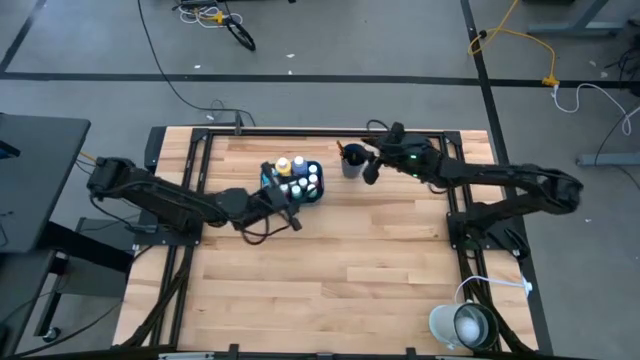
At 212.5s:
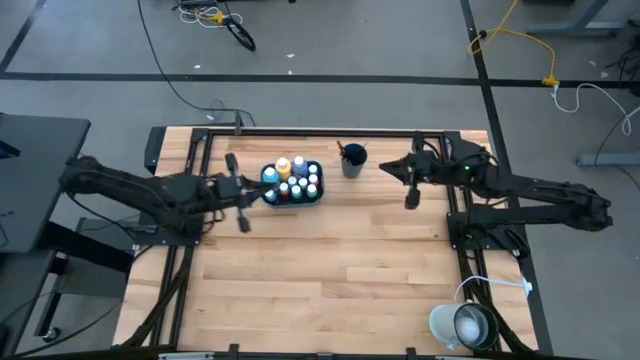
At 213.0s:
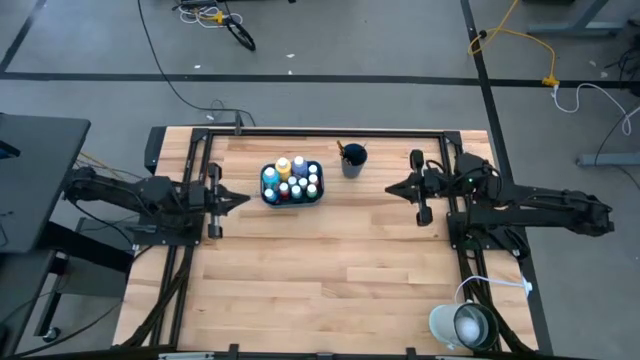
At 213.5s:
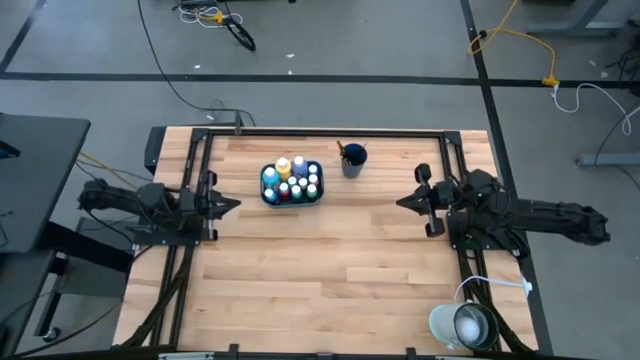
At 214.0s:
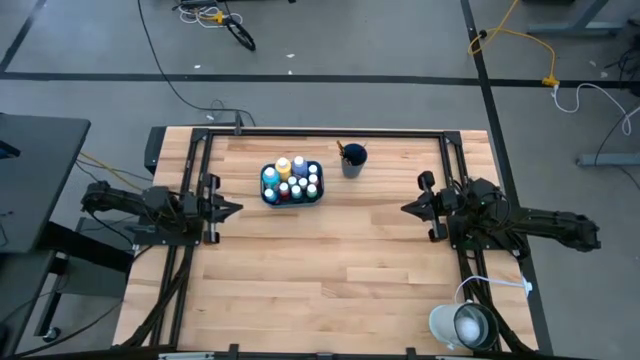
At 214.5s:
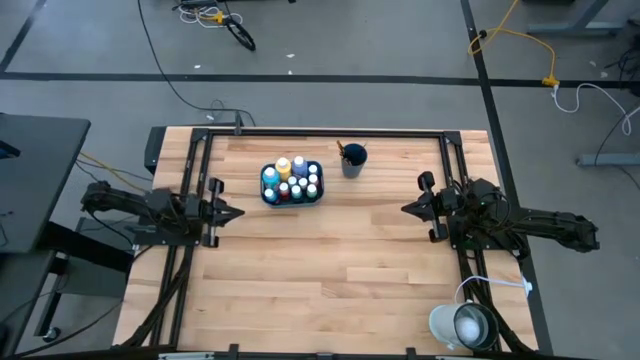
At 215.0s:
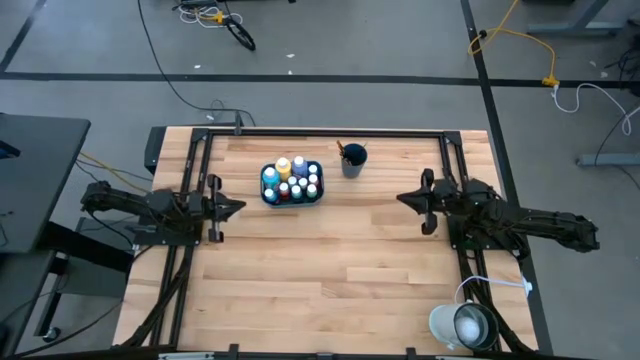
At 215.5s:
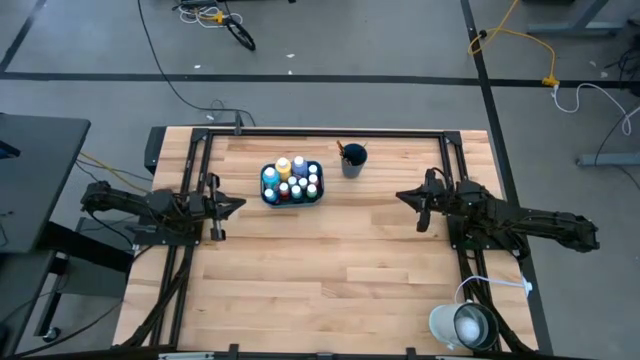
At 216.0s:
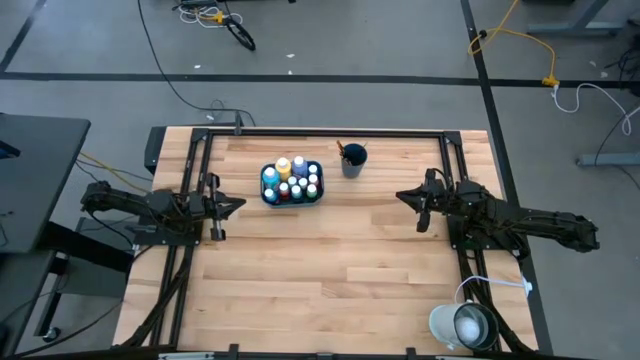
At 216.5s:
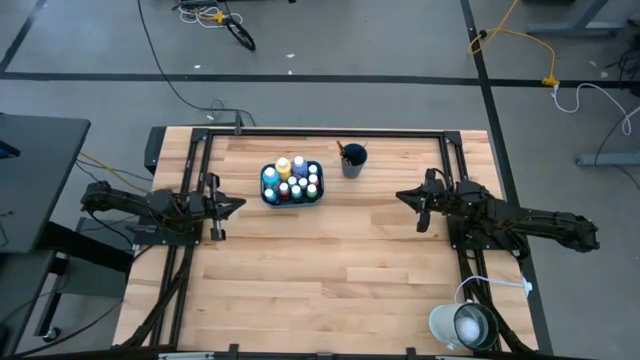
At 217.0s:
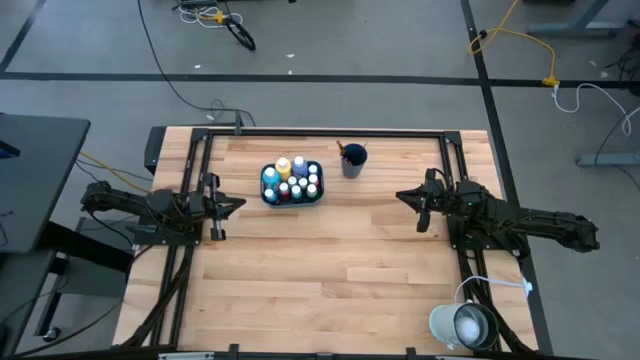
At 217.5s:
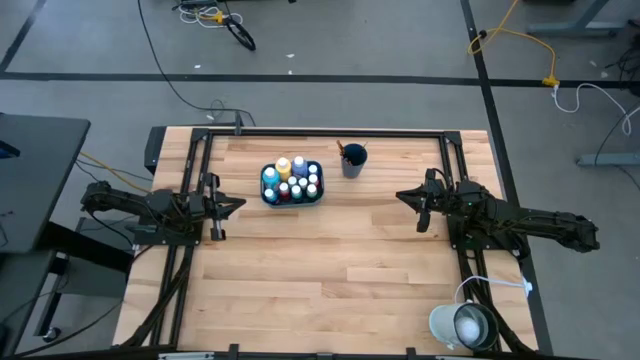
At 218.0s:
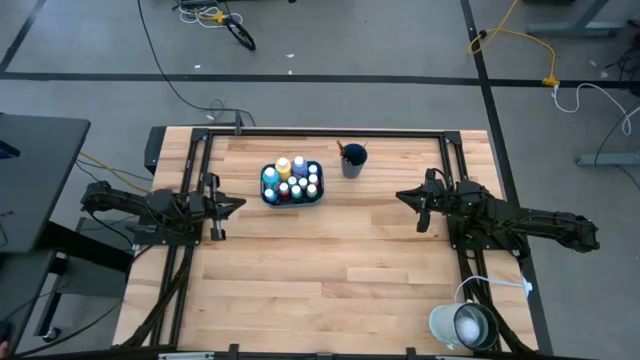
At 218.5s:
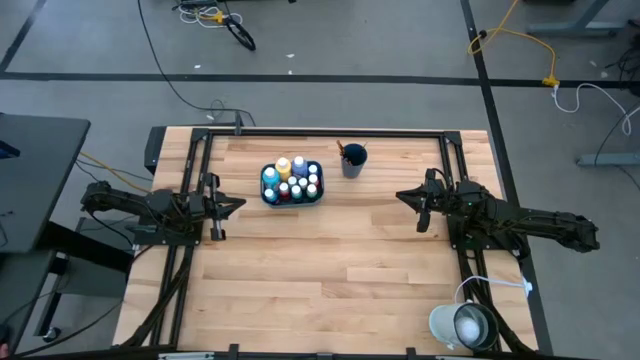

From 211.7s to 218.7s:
Task: Pick & Place Paint Supplies
Return to Home Position

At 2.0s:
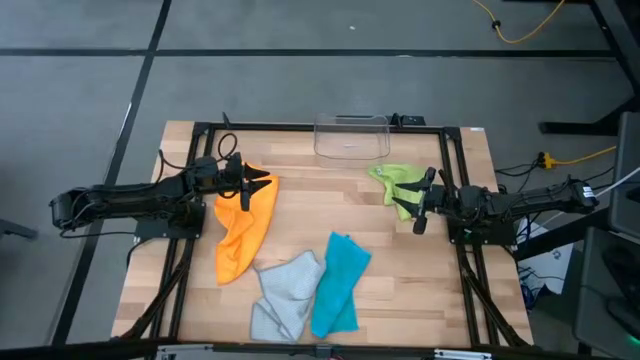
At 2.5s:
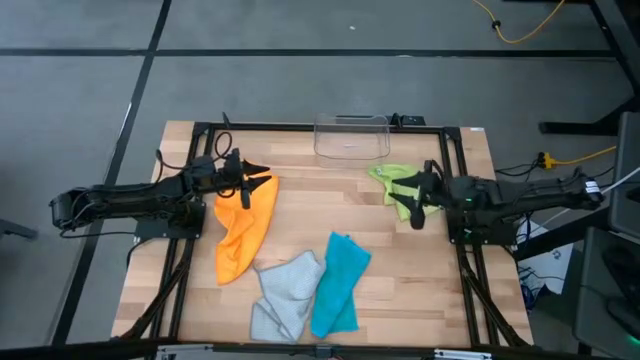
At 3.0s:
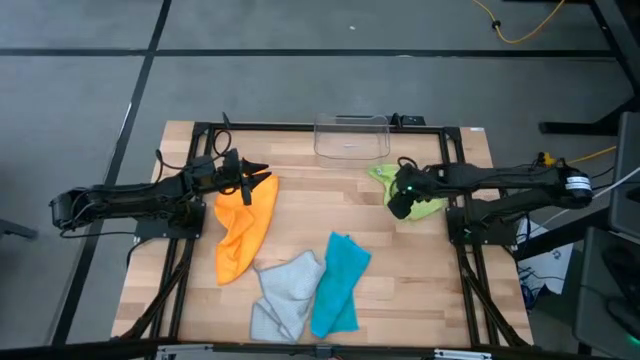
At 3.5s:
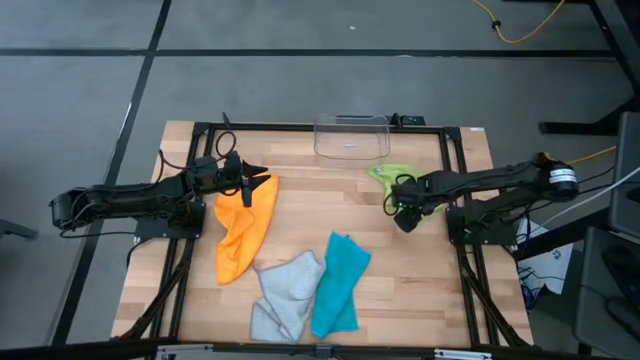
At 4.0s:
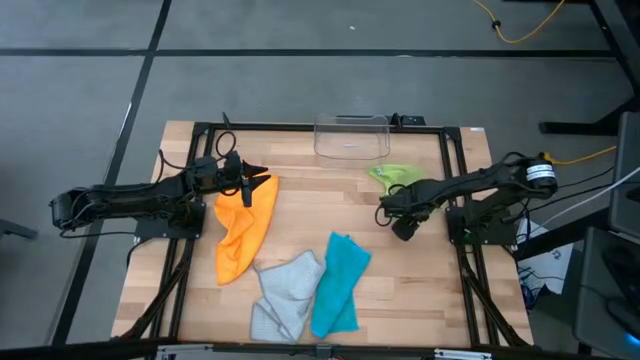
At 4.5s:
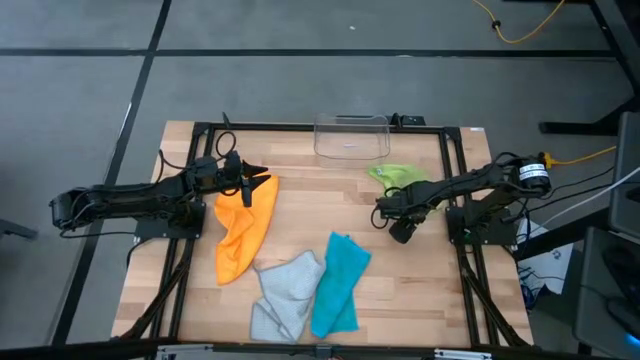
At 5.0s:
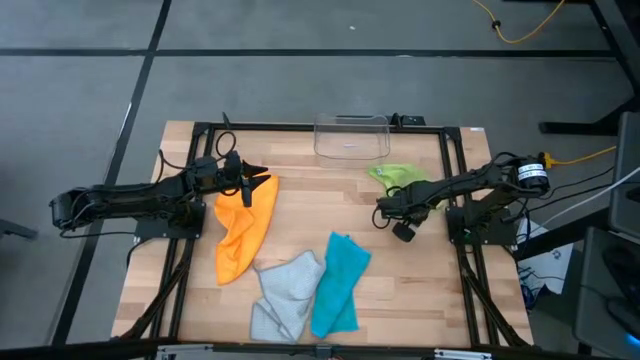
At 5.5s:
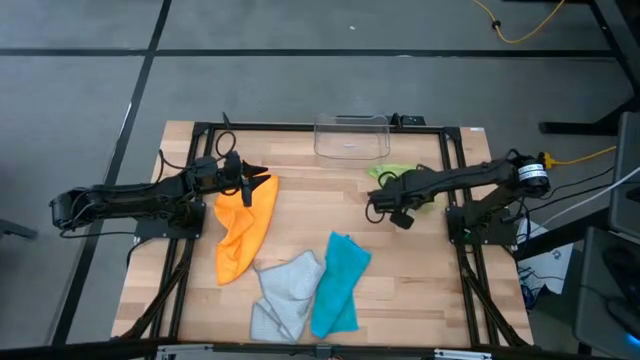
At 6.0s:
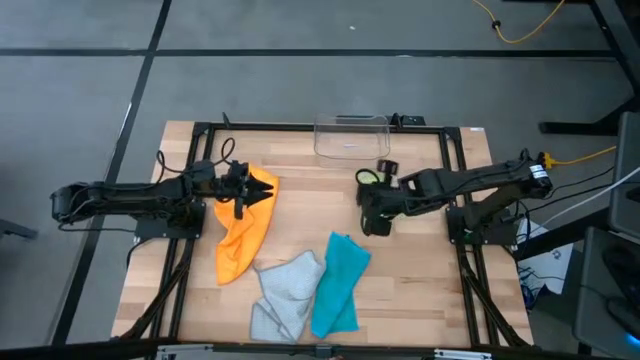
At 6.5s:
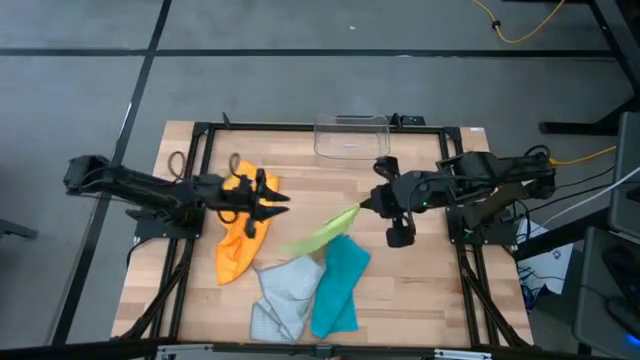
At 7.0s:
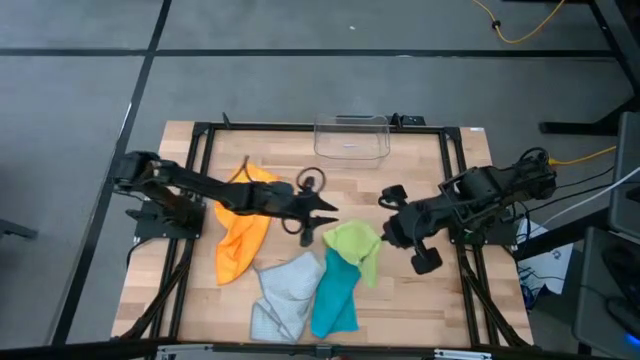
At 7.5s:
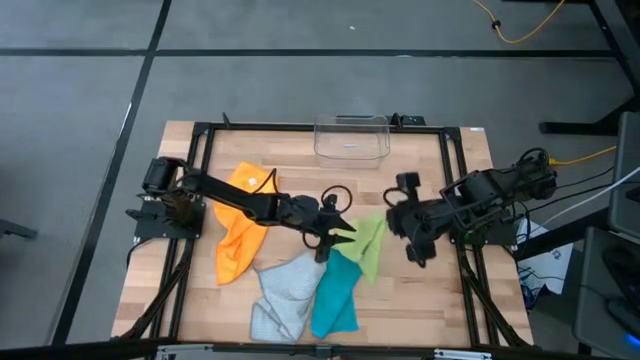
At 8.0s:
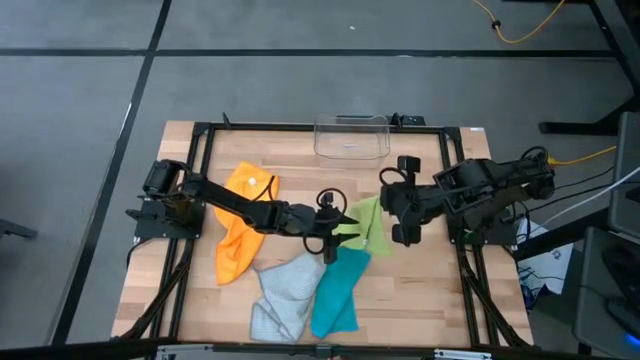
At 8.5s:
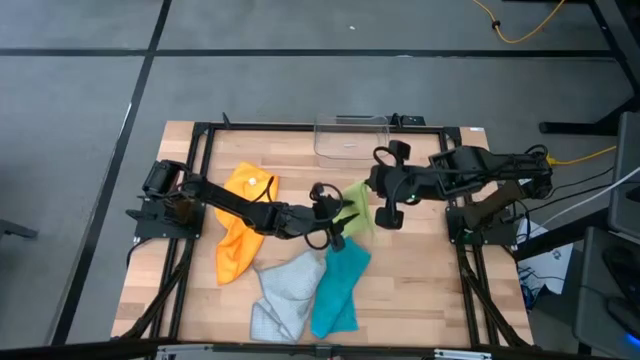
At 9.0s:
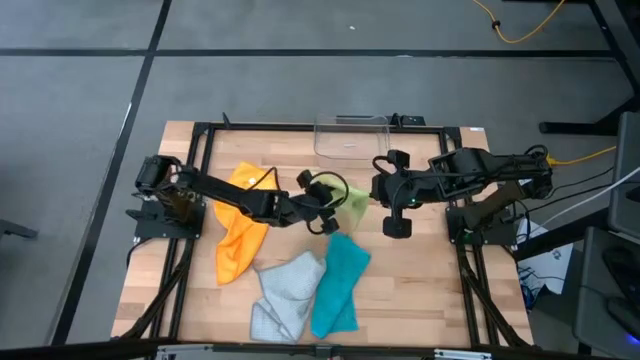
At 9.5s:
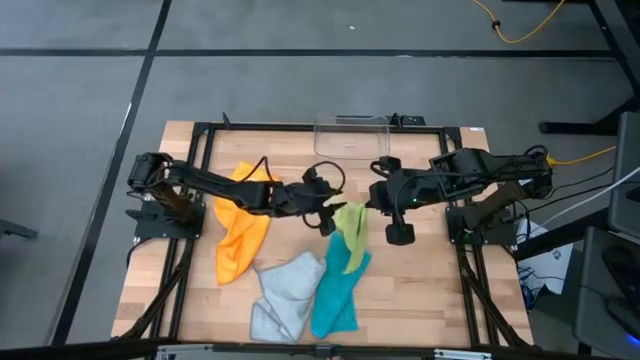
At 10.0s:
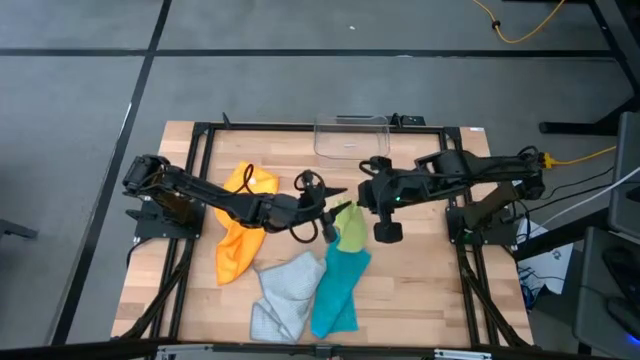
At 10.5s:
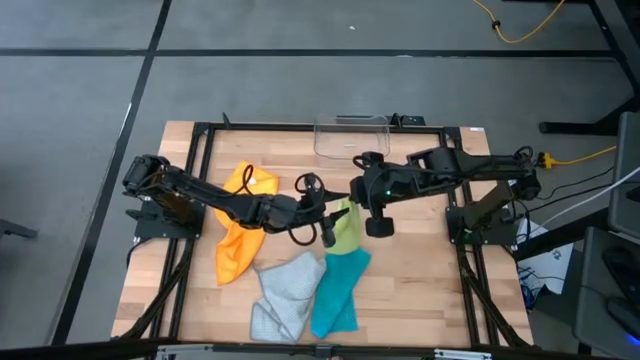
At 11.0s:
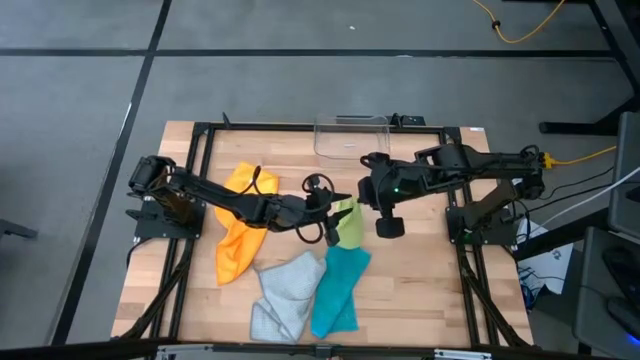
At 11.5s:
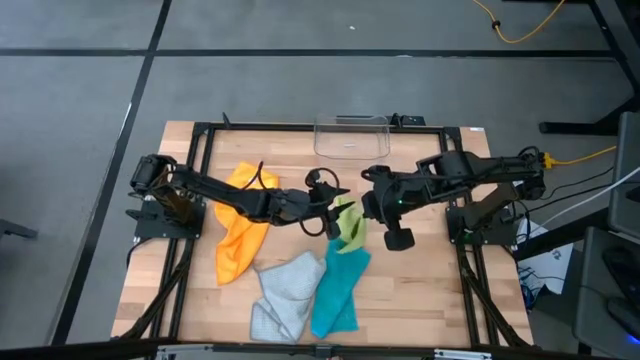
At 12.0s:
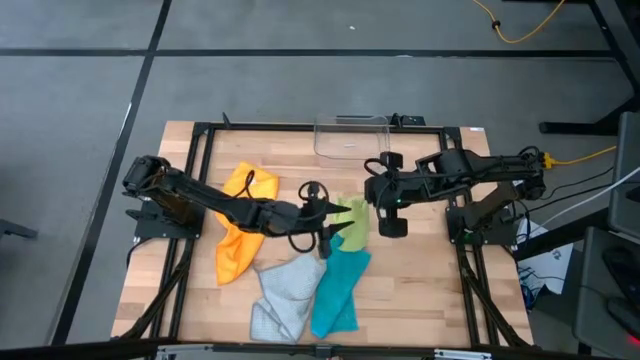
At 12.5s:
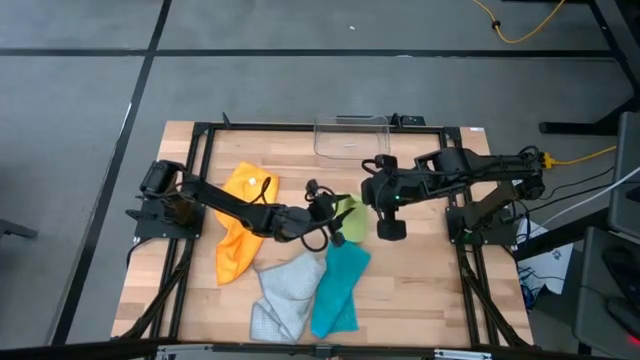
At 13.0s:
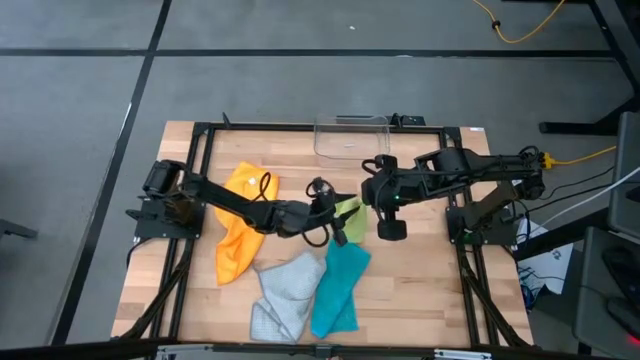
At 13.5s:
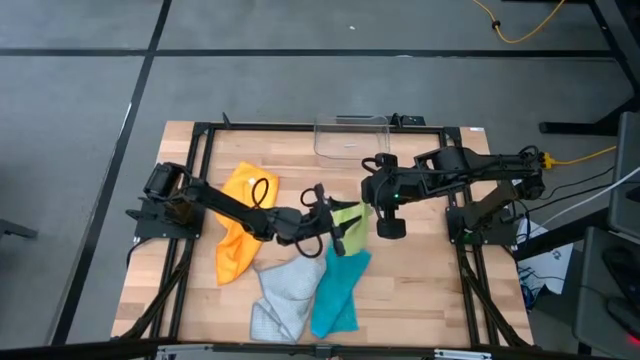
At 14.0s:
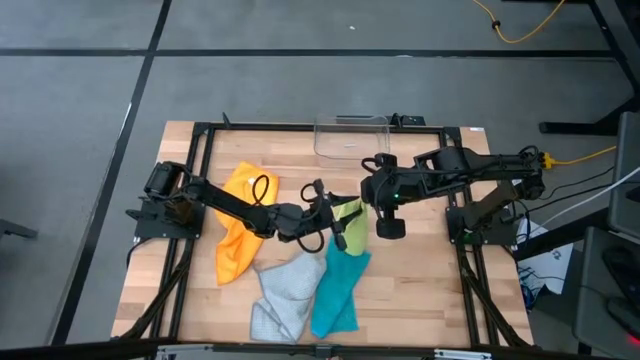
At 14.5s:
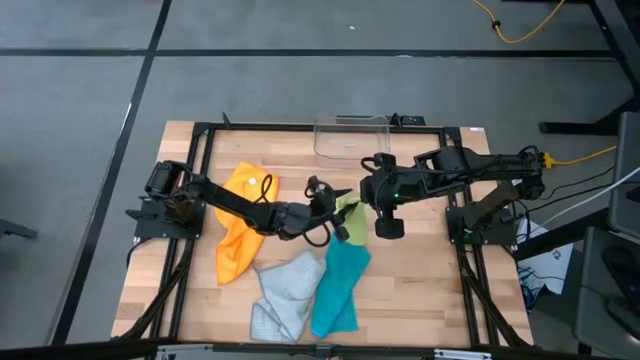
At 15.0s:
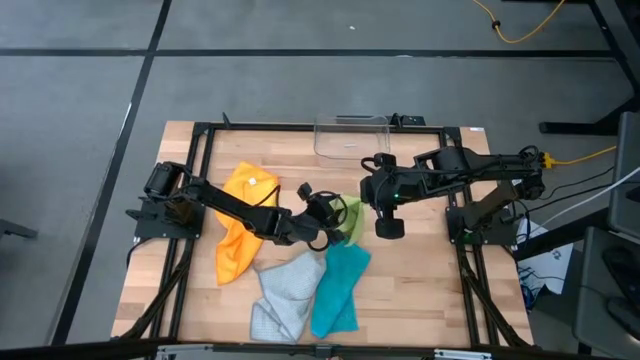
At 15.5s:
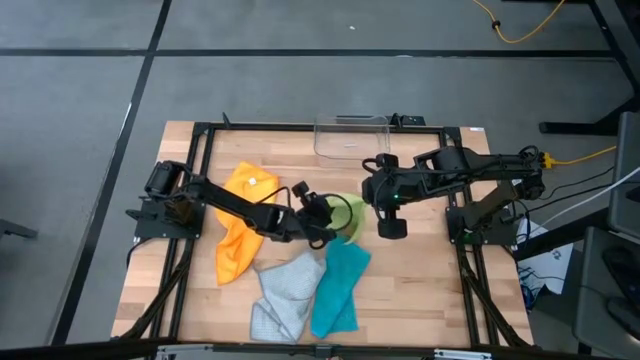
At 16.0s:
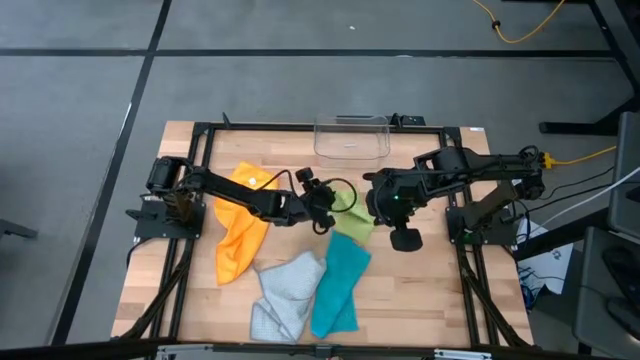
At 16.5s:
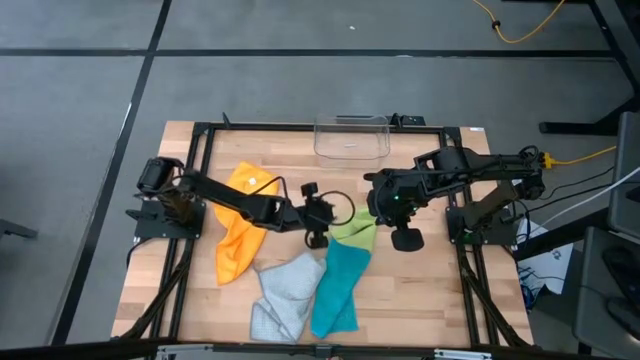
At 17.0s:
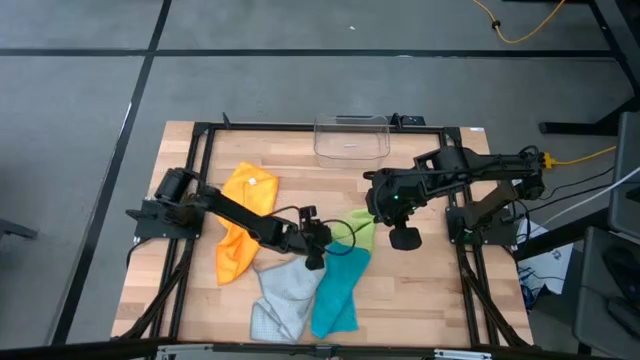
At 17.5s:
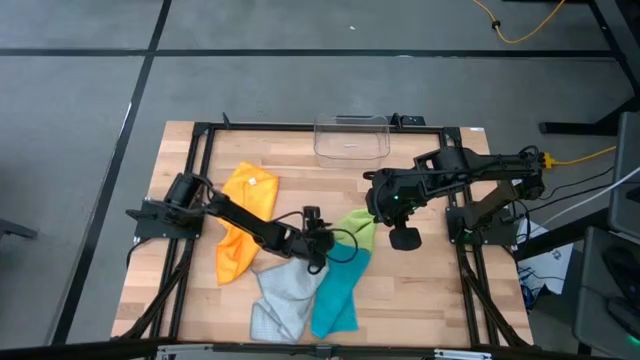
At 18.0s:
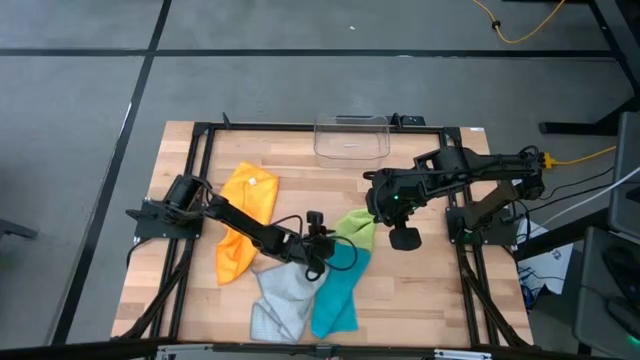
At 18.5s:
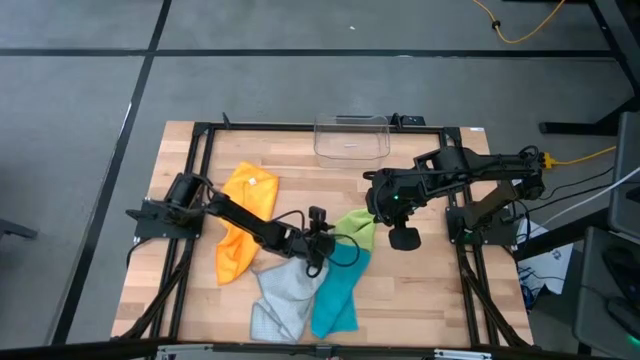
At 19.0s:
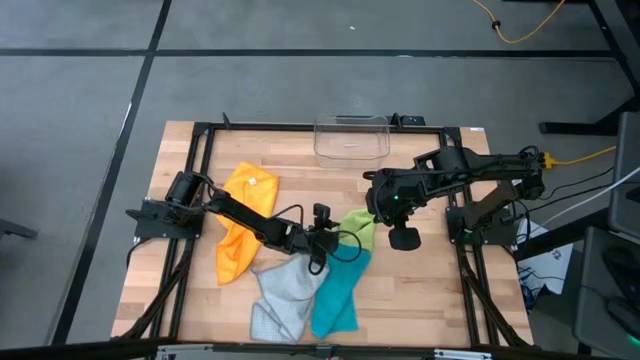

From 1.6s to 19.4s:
Task: Fold microfiber towels
Fold the green microfiber towel
